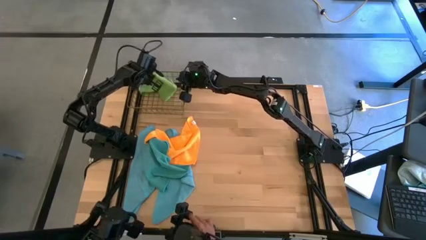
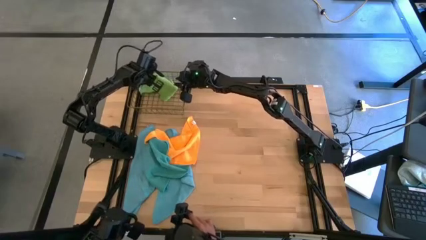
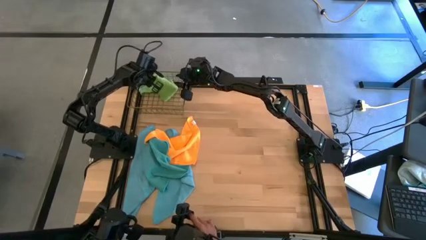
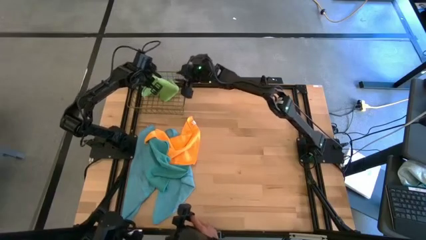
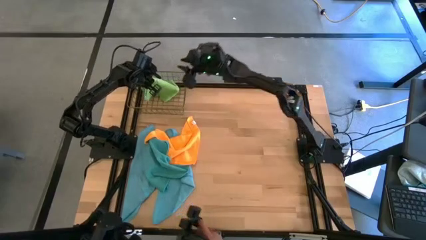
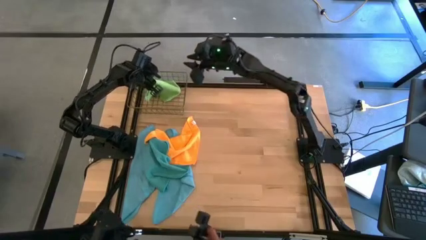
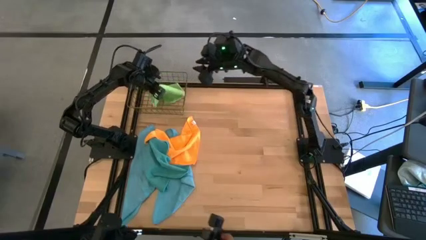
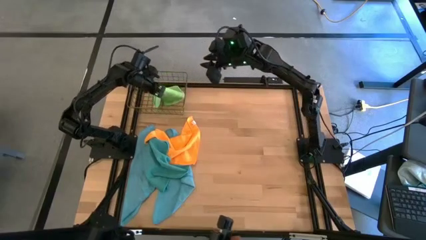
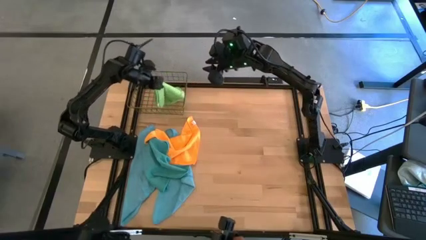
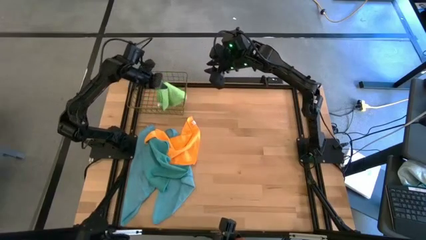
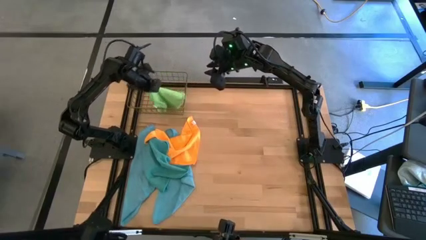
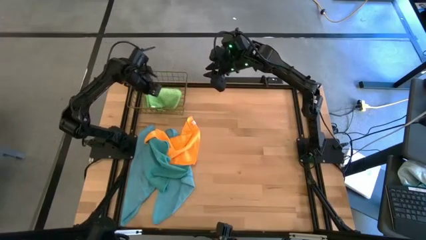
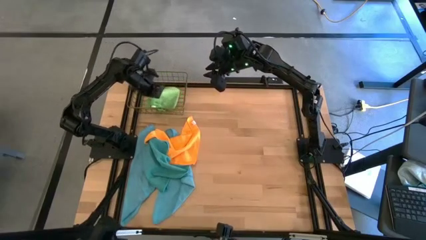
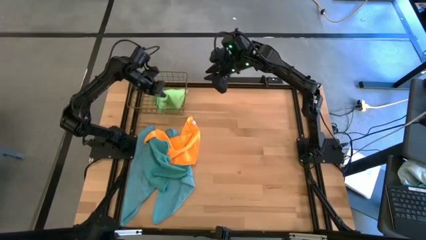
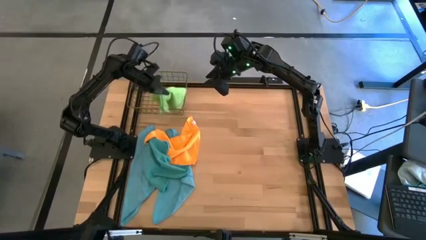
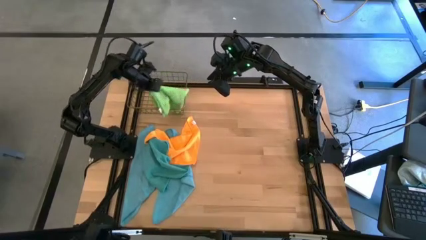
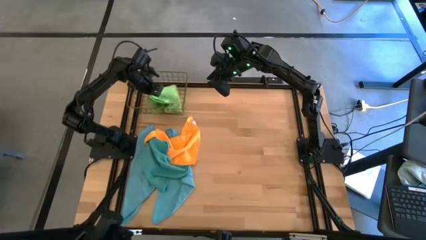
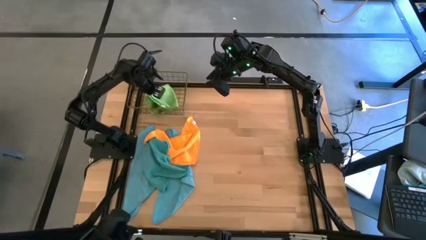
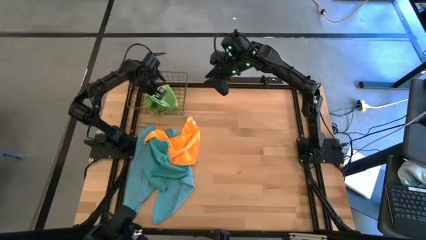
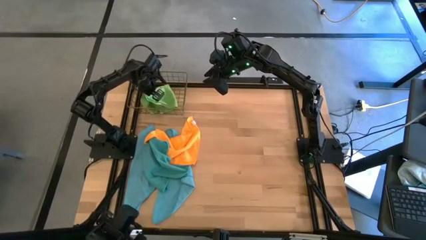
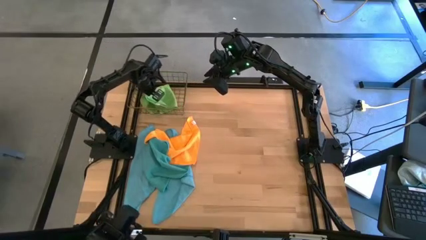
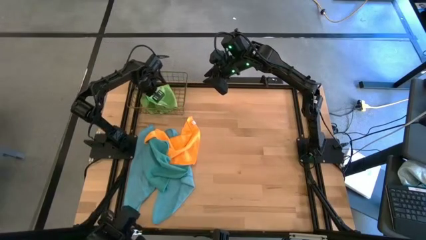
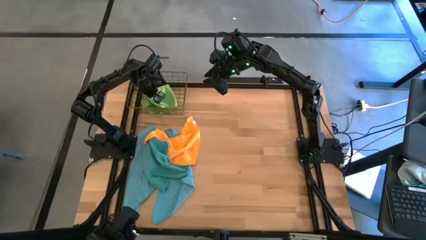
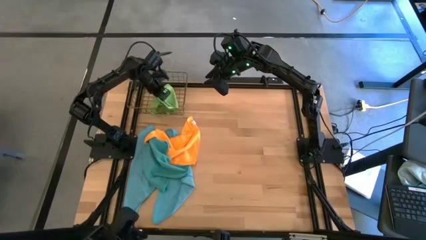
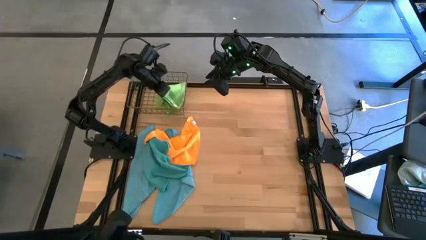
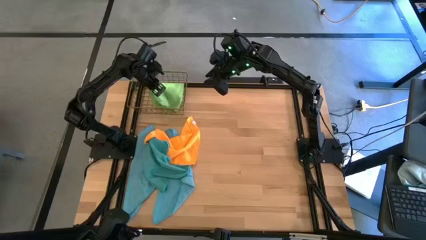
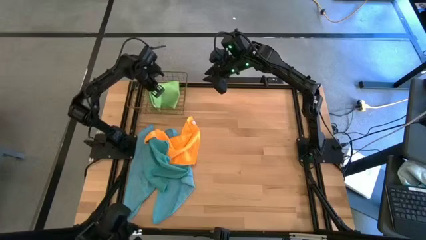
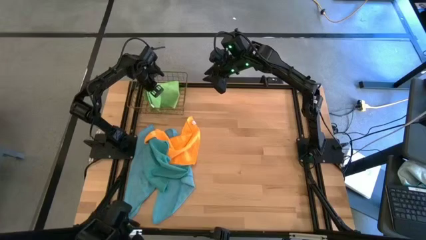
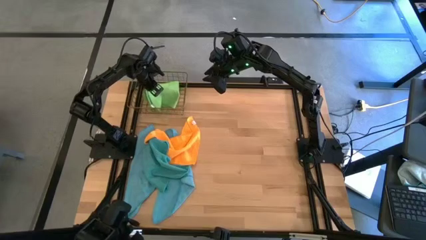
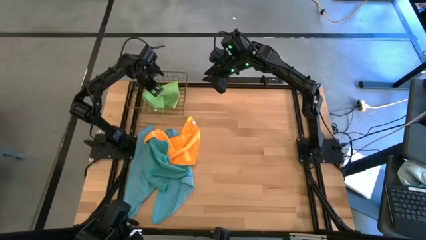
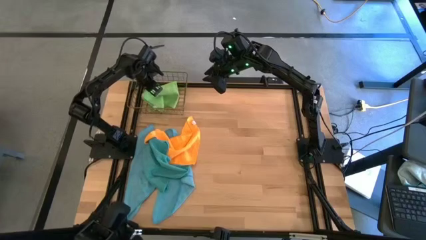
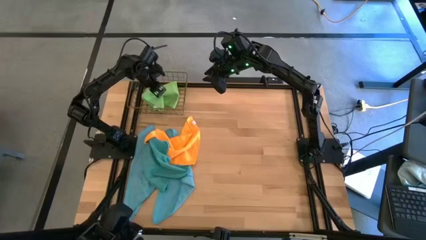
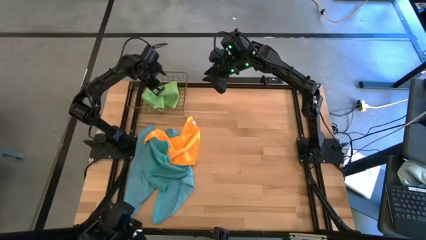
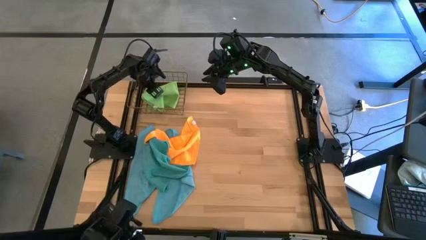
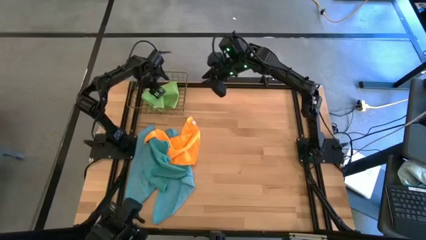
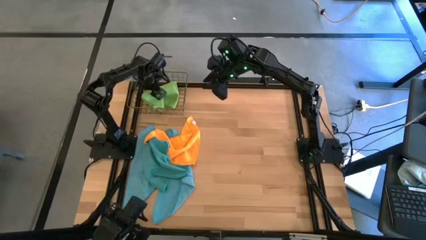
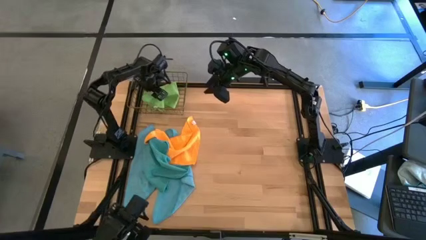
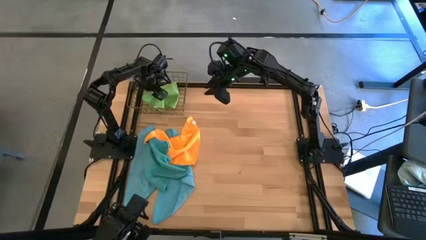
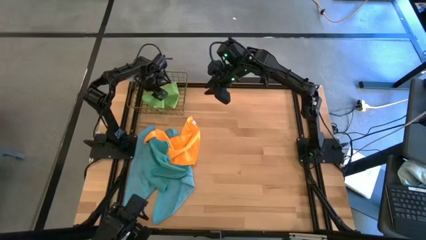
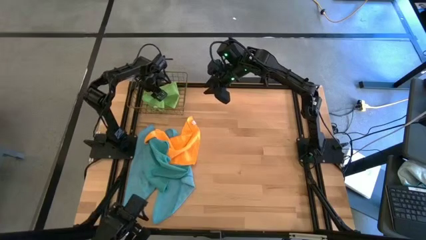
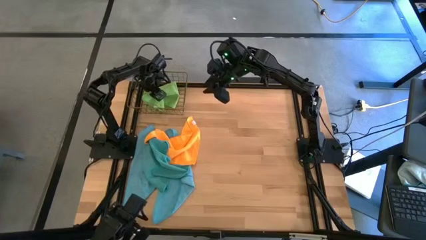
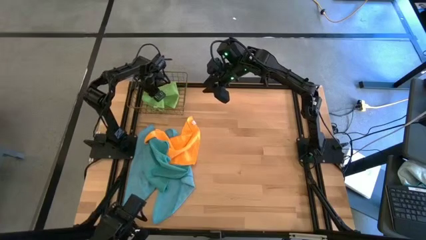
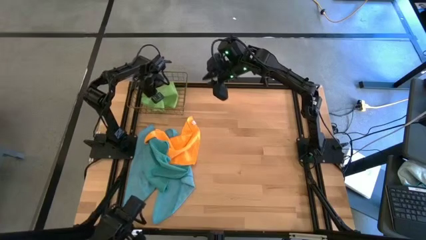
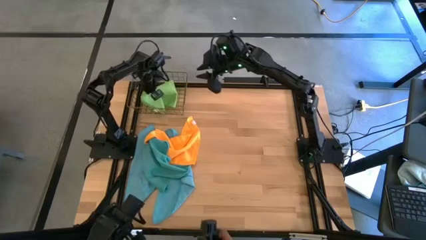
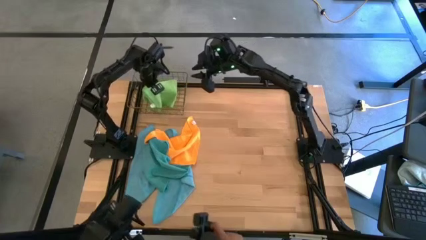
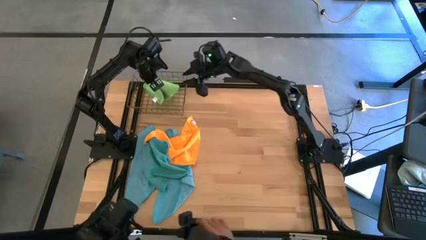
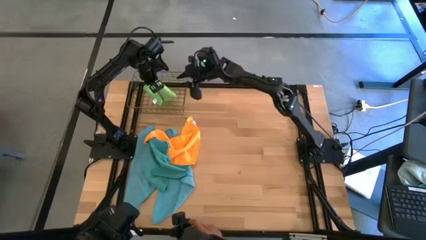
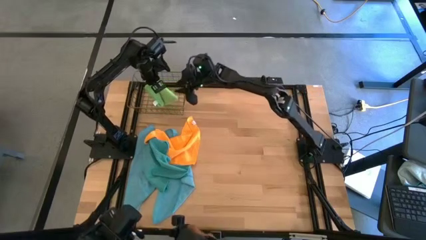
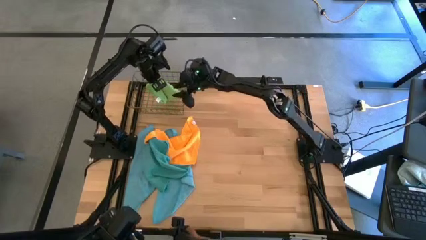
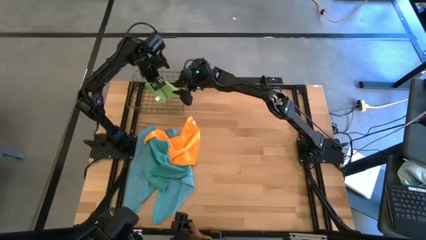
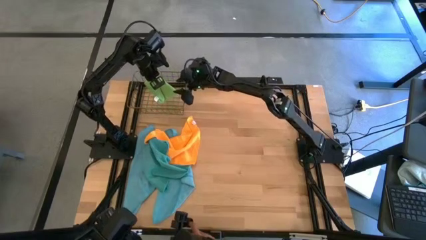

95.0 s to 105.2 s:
Task: Fold microfiber towels
Put the folded green microfiber cloth into the wire basket

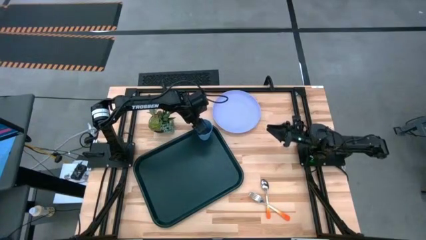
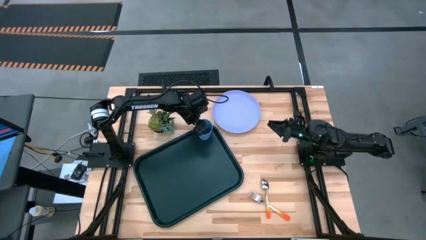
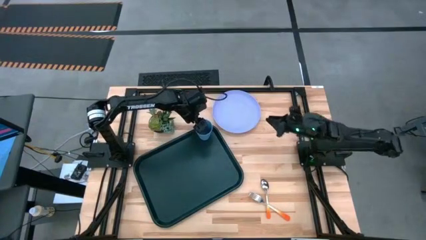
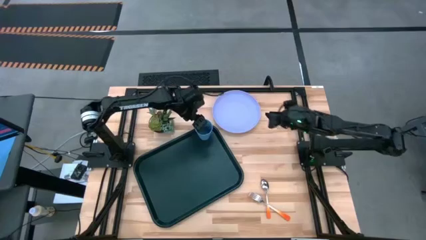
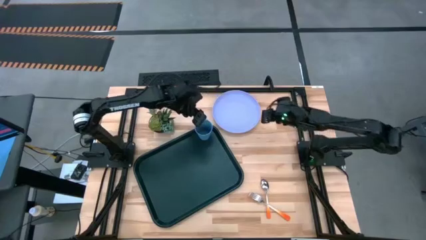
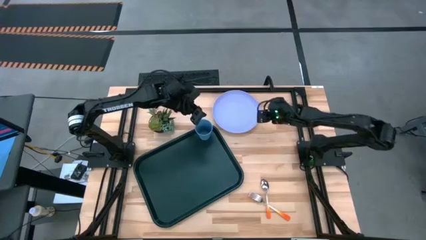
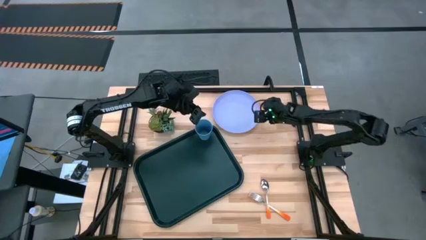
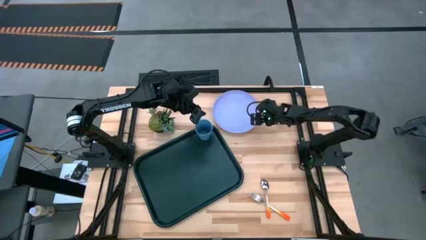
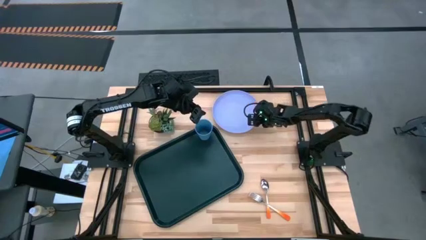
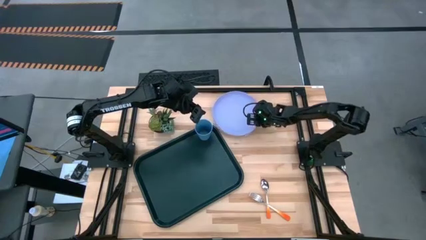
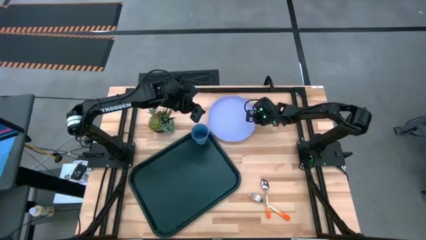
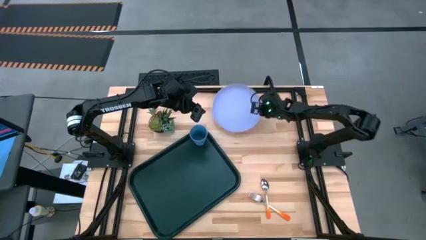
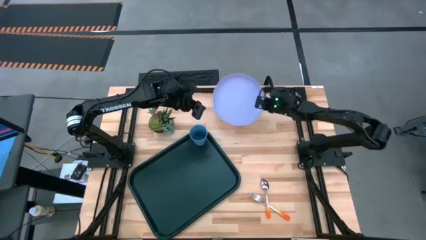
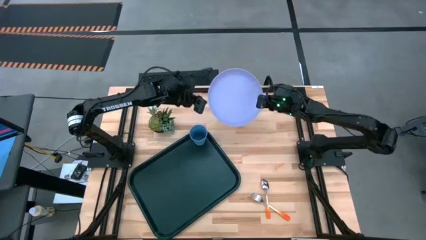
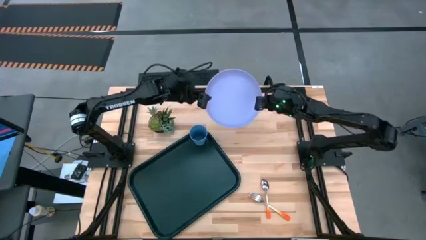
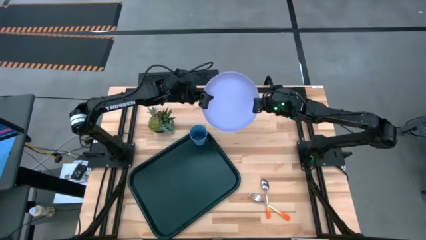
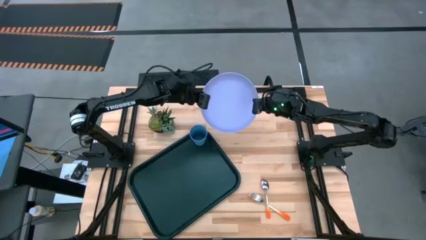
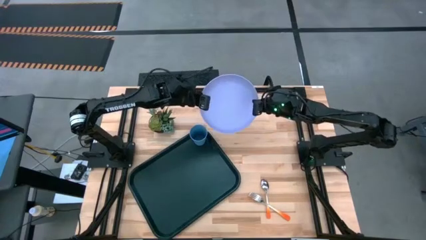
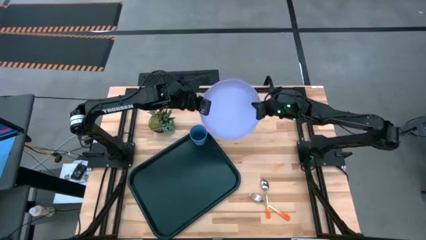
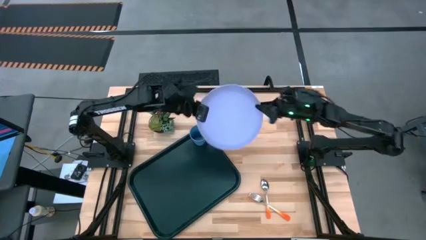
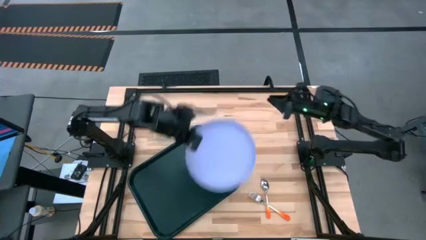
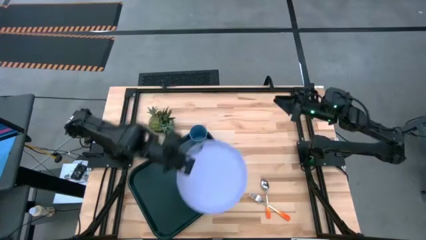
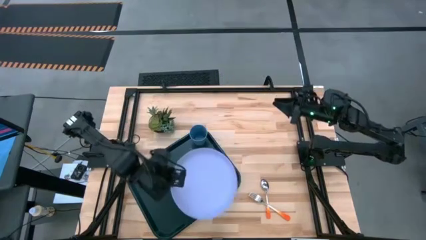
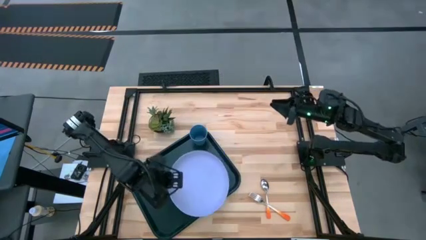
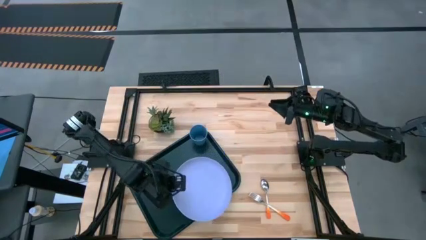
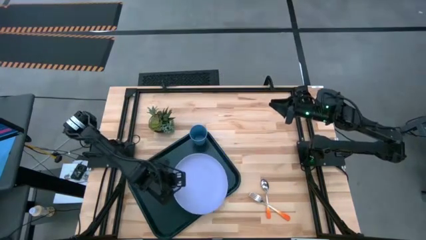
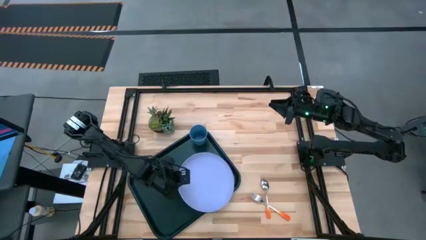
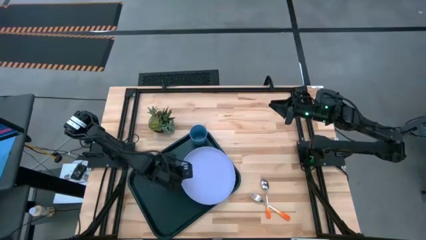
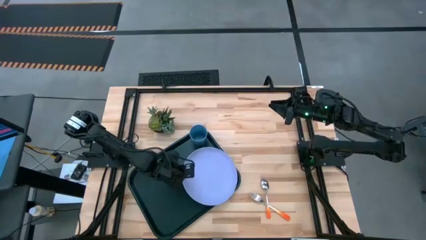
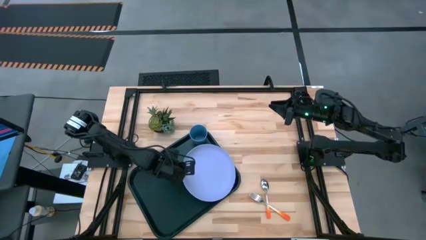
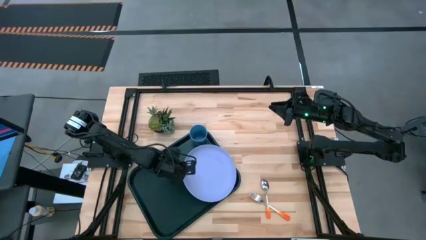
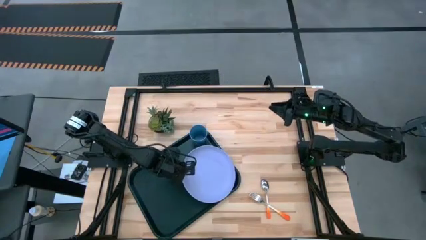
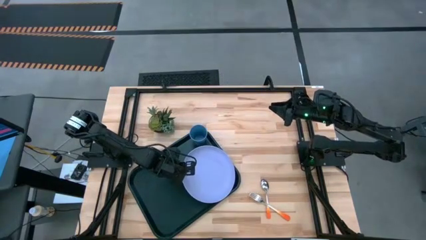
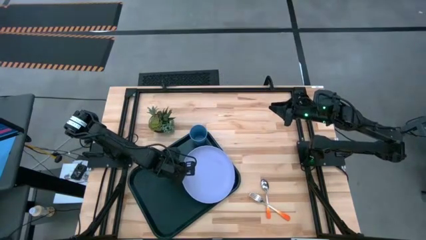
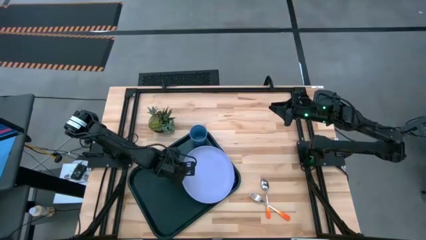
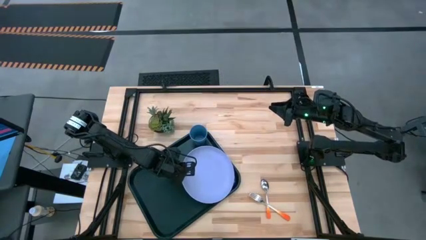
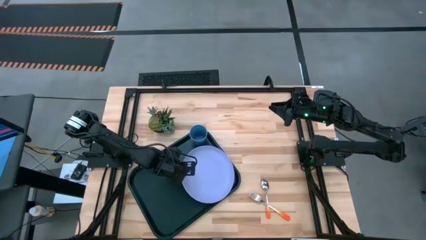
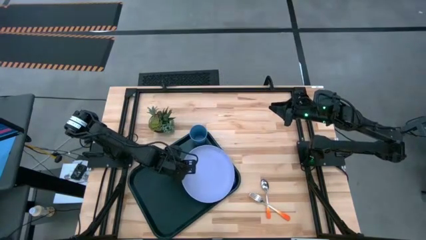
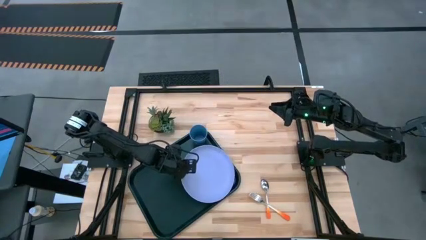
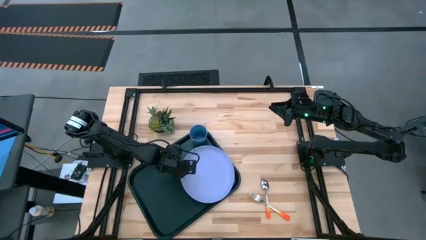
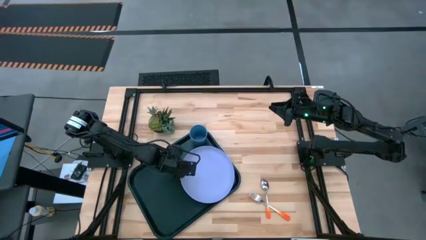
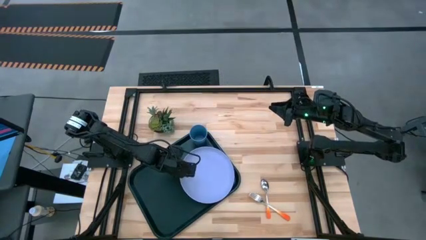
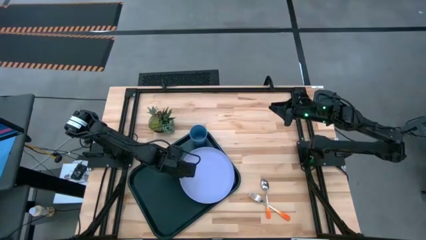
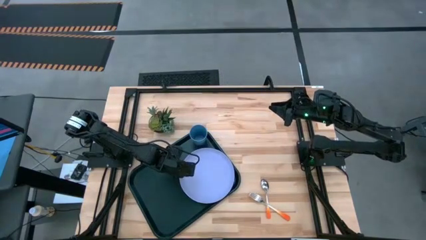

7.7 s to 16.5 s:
Task: Pick and place plate/cup/fork/spoon on tray
Put the purple plate on the black serving tray to the bottom of the blue cup
